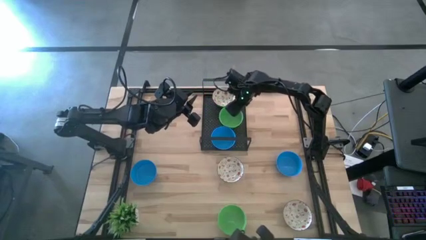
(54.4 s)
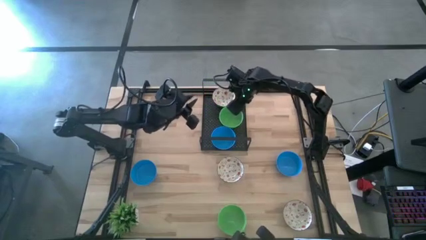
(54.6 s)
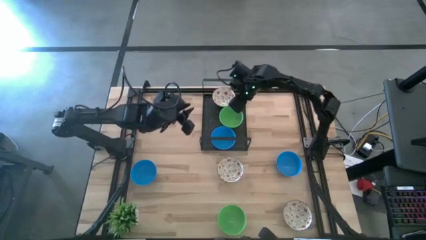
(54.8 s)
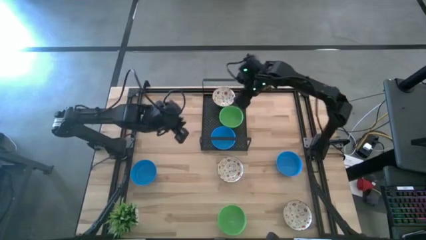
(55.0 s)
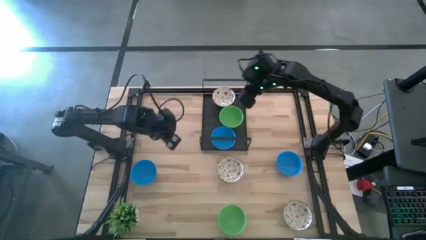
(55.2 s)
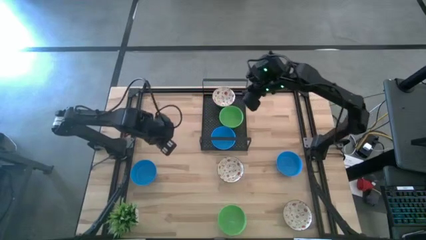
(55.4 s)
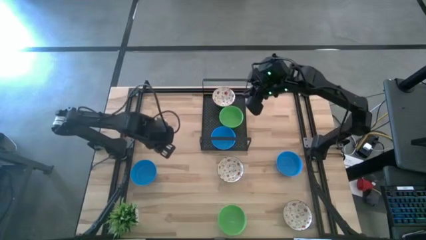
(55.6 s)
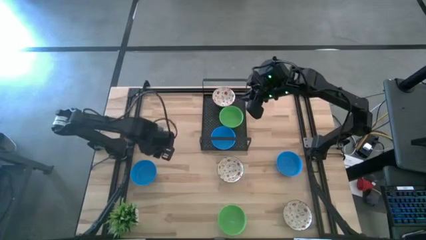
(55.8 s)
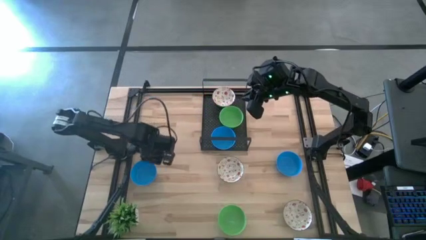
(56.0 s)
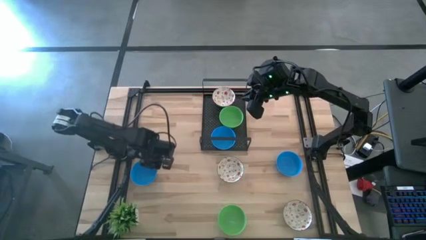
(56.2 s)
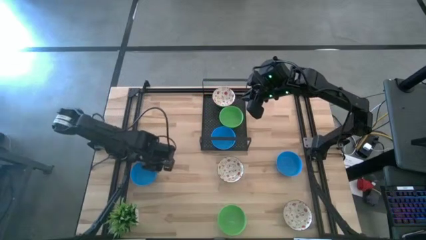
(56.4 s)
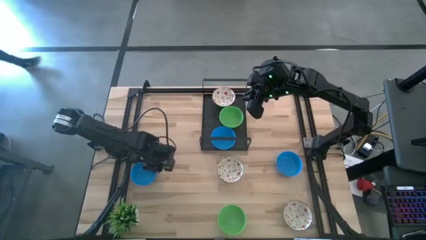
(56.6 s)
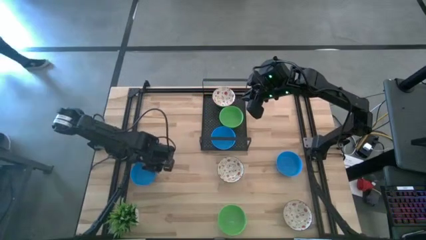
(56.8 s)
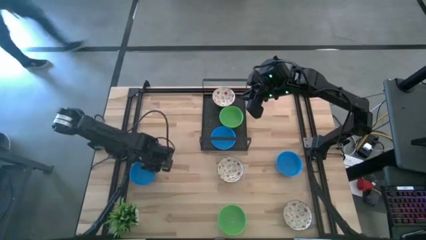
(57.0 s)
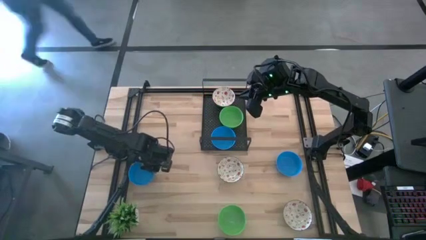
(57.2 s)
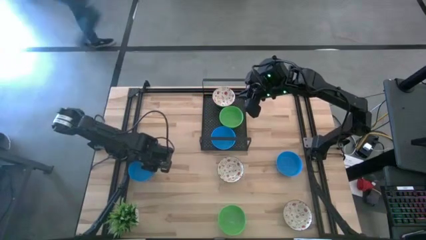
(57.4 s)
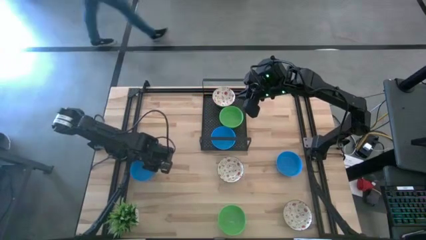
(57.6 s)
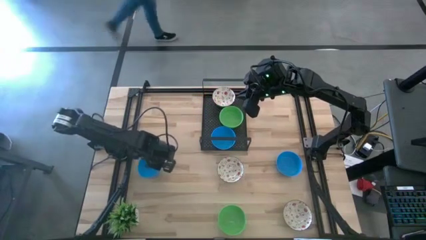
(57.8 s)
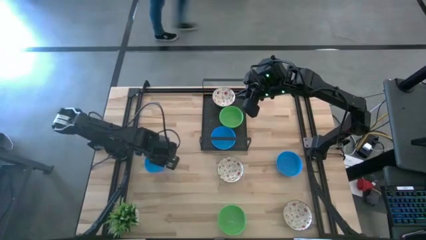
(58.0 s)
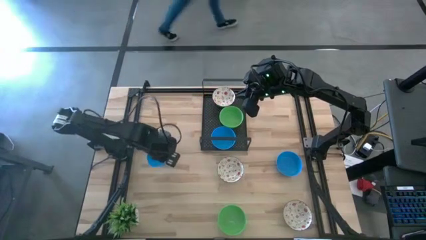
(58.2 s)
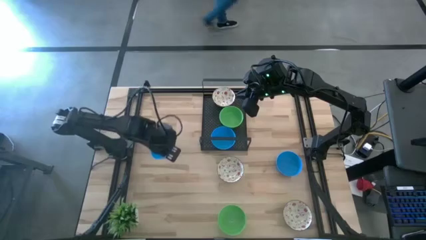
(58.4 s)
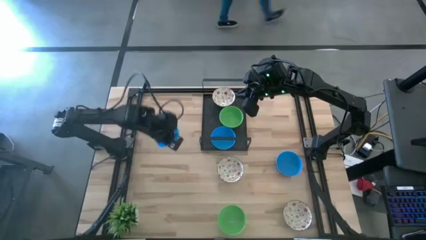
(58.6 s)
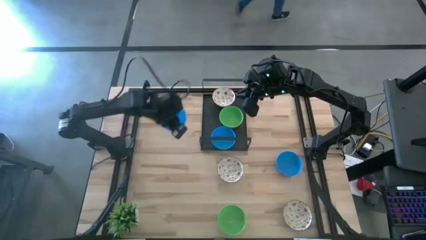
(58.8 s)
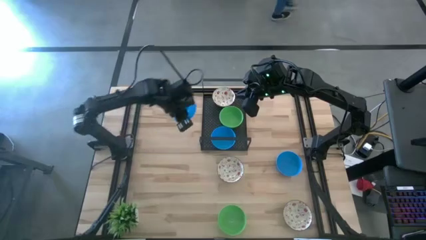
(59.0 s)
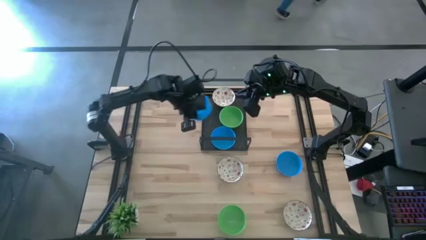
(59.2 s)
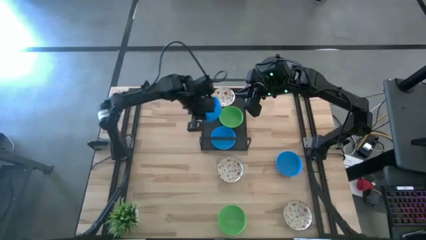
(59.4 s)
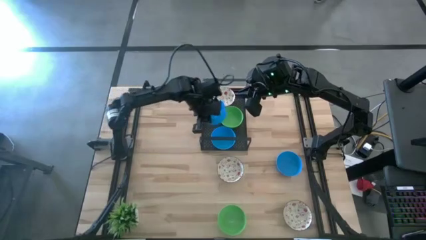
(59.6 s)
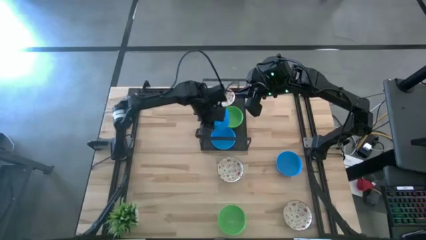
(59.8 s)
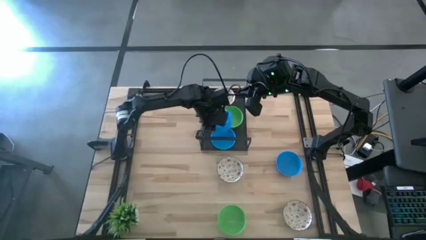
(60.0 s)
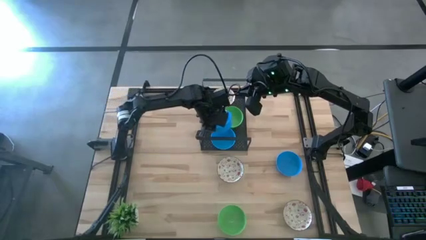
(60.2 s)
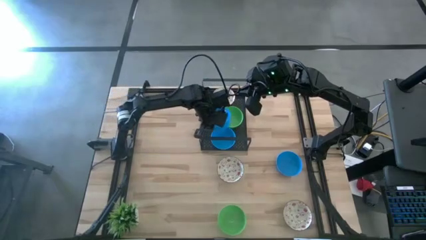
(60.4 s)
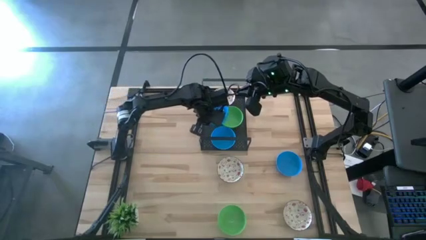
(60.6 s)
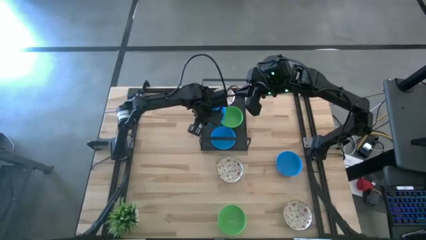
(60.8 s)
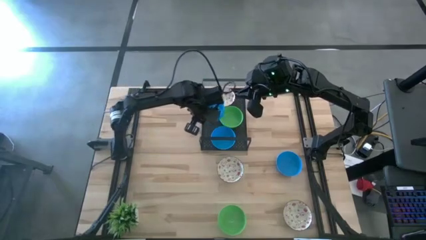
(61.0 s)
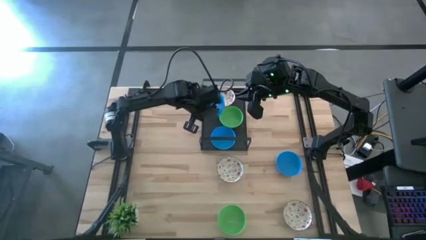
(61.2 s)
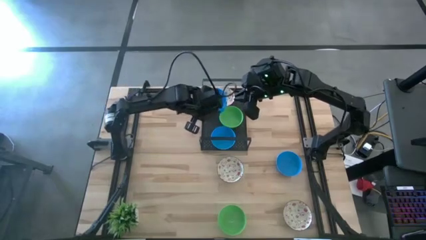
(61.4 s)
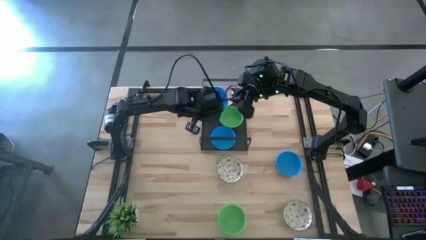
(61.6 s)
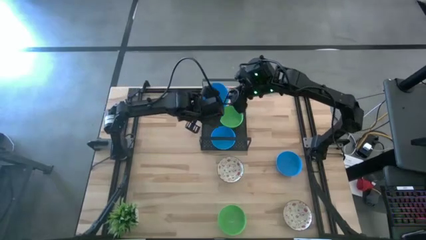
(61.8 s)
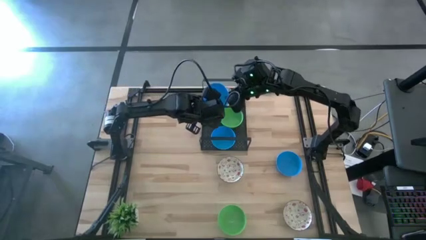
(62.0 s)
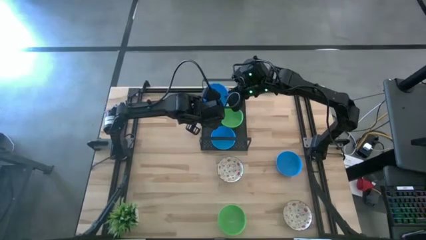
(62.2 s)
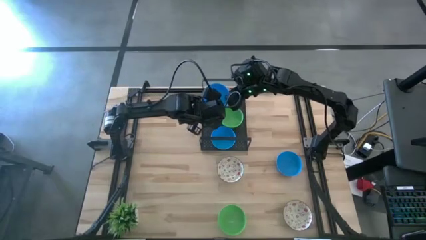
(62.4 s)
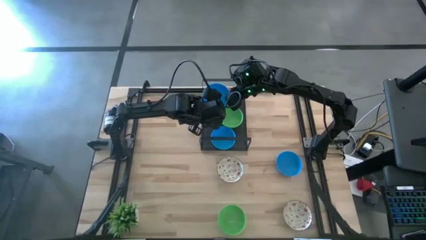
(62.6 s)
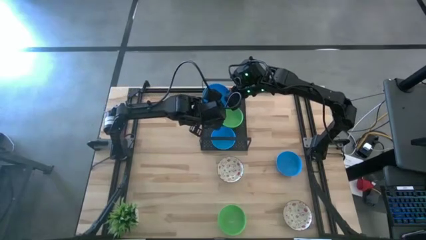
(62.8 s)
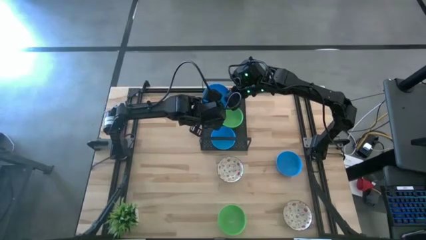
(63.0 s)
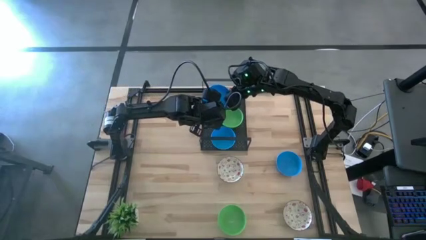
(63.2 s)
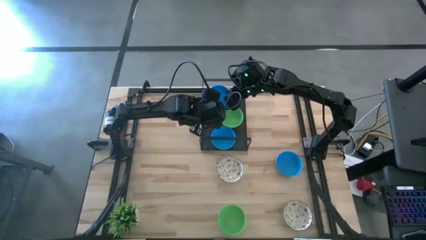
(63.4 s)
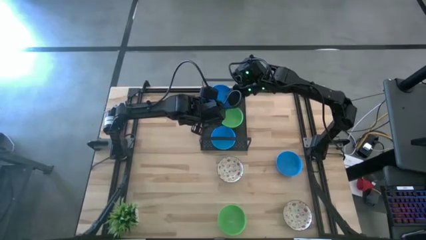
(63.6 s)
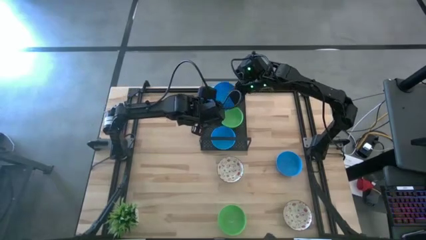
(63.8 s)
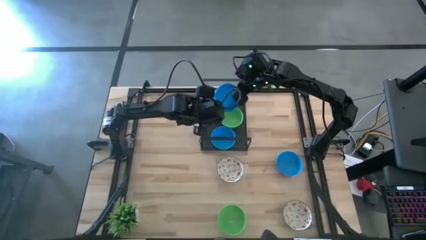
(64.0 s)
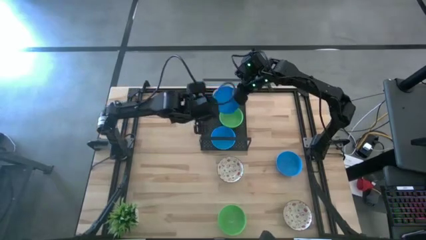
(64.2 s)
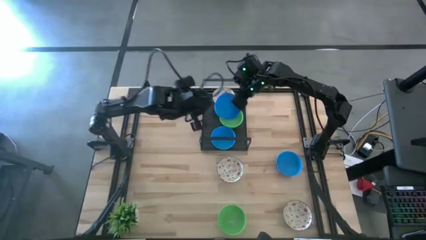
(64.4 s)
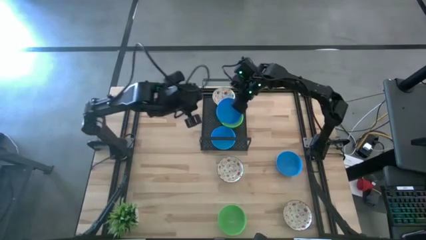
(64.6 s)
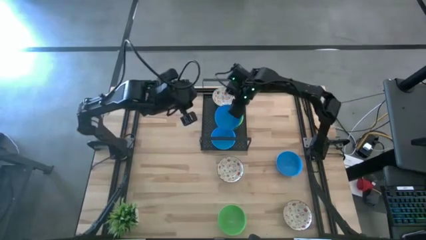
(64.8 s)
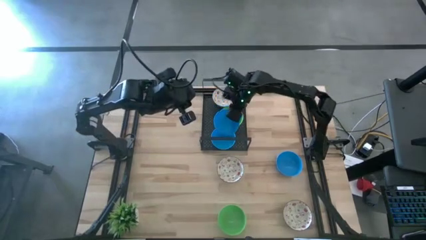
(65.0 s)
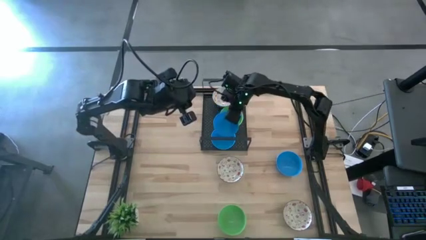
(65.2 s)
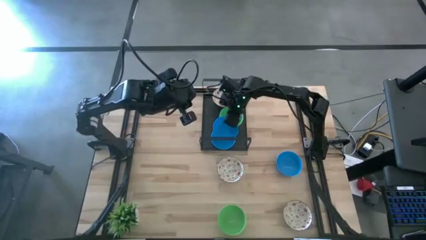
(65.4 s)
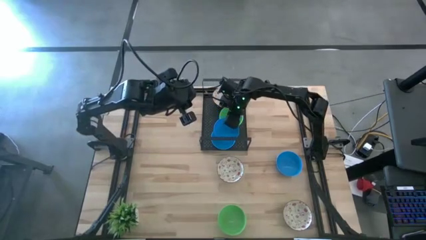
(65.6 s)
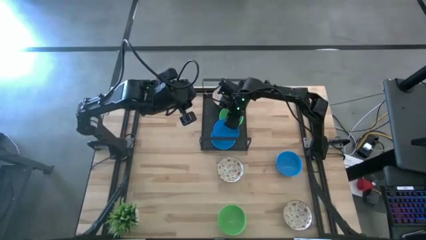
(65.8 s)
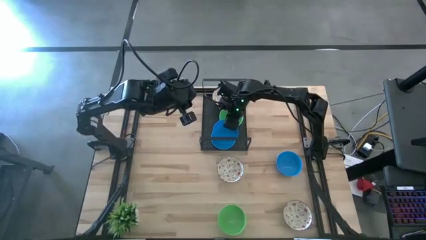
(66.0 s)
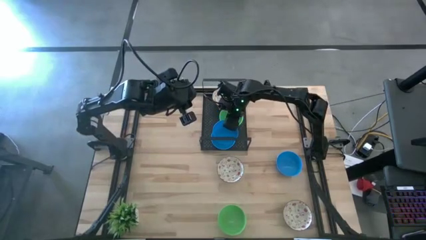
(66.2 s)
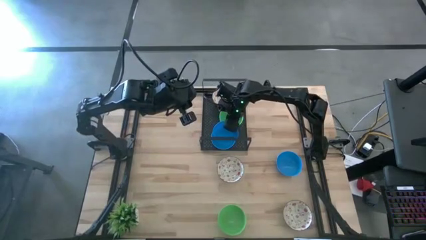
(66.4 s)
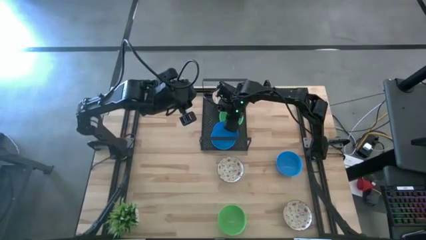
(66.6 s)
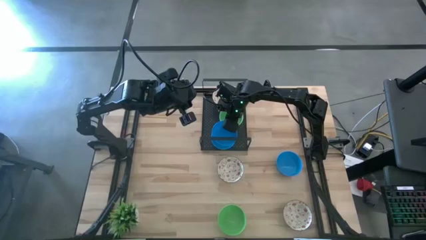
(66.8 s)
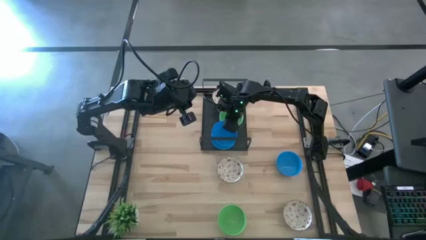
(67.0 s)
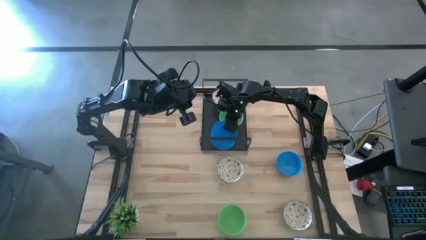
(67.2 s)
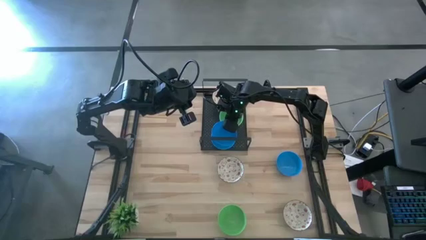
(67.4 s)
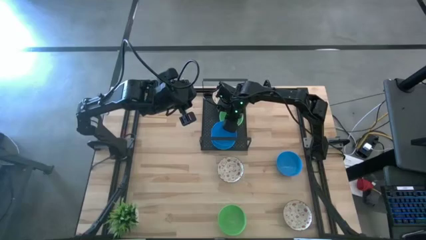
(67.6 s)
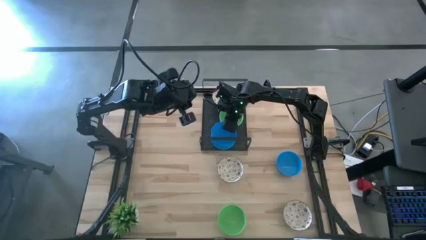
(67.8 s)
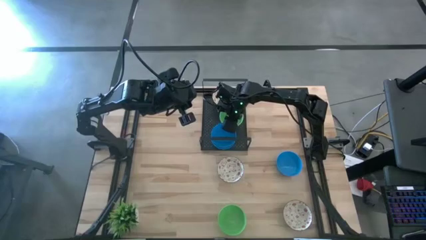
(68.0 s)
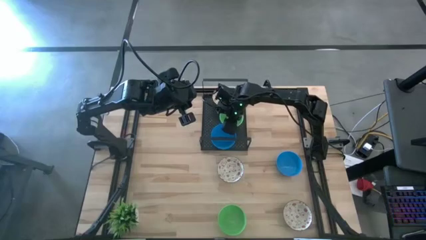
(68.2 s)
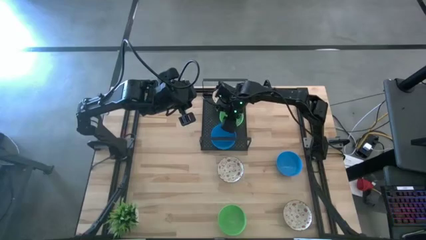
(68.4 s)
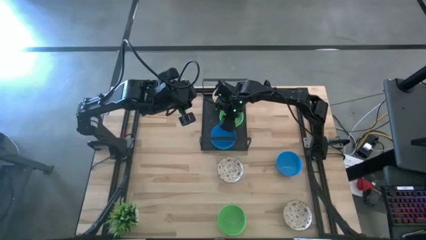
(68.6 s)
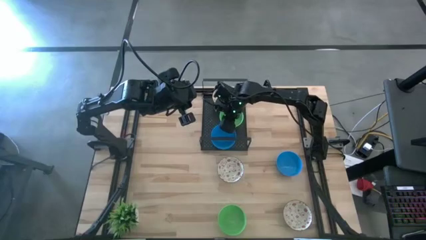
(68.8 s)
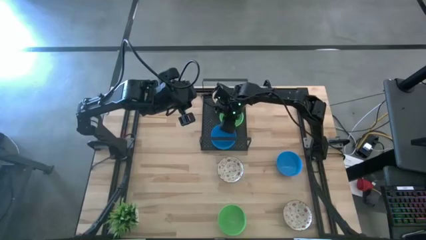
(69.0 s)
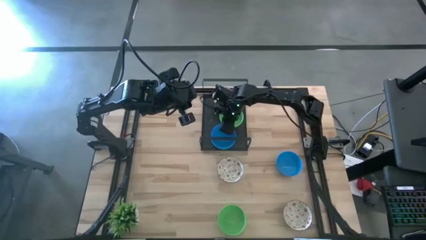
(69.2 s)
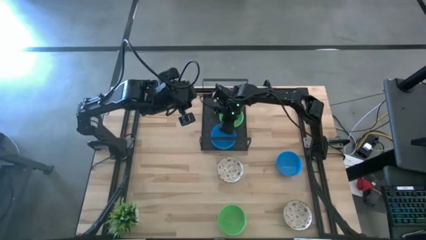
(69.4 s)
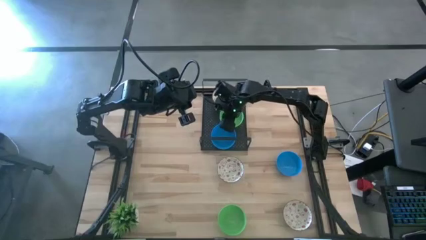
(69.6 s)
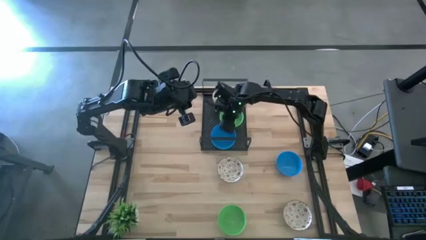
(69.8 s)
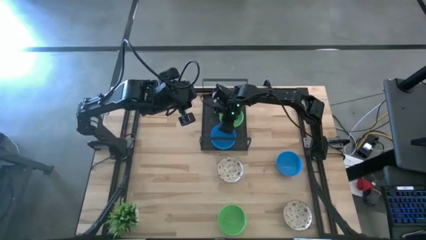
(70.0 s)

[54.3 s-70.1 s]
Task: Pick & Place Mini bowls
Stack the left blue bowl on the blue bowl on the shelf
